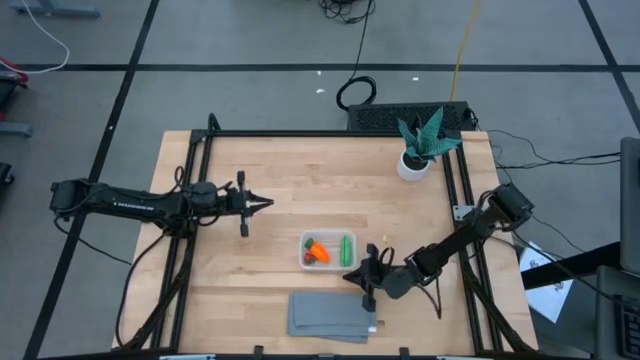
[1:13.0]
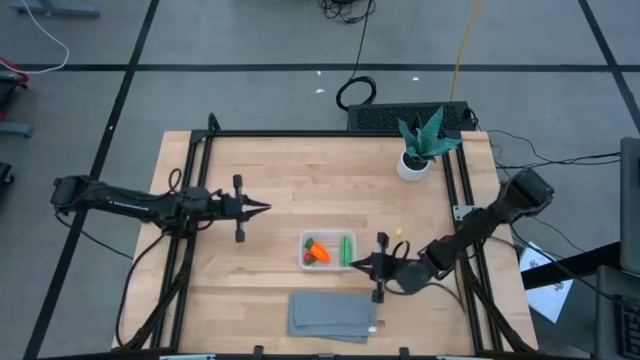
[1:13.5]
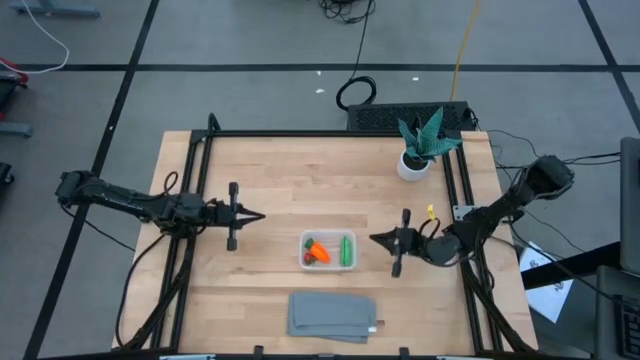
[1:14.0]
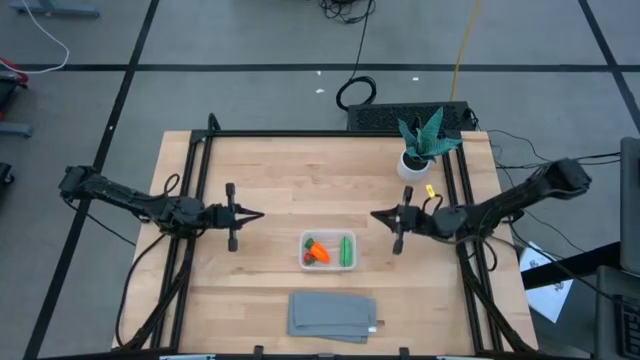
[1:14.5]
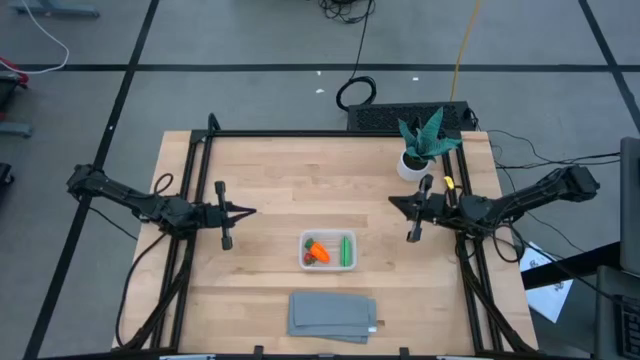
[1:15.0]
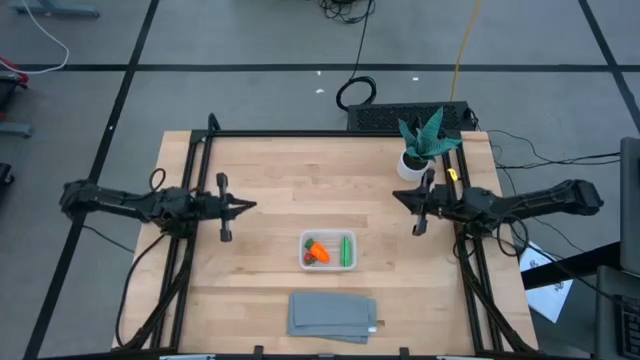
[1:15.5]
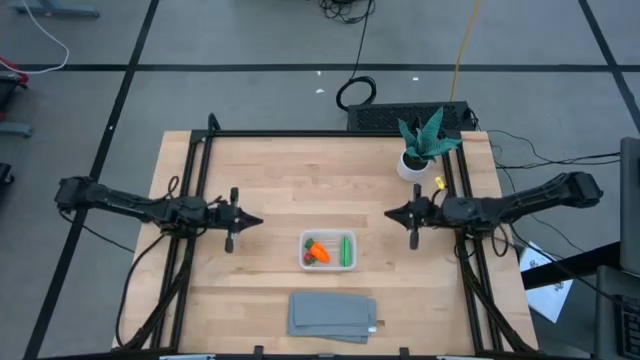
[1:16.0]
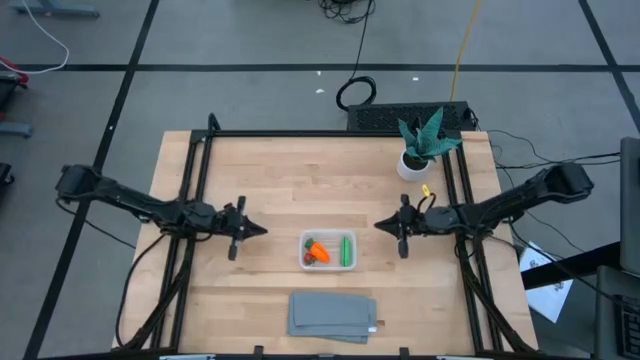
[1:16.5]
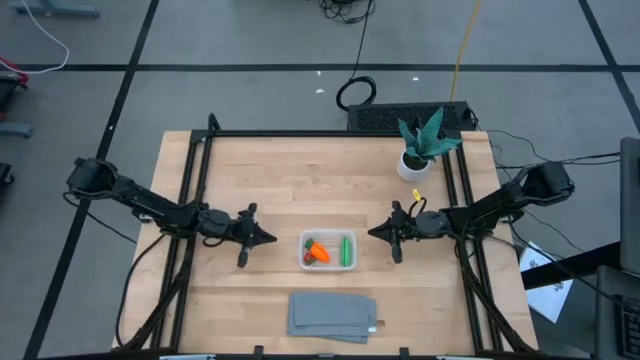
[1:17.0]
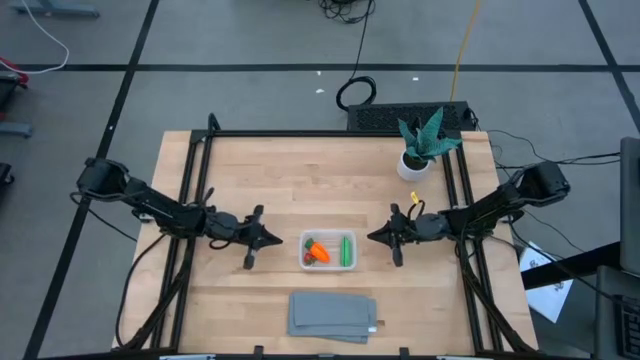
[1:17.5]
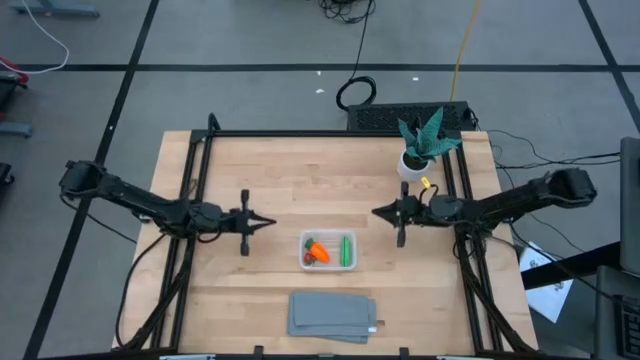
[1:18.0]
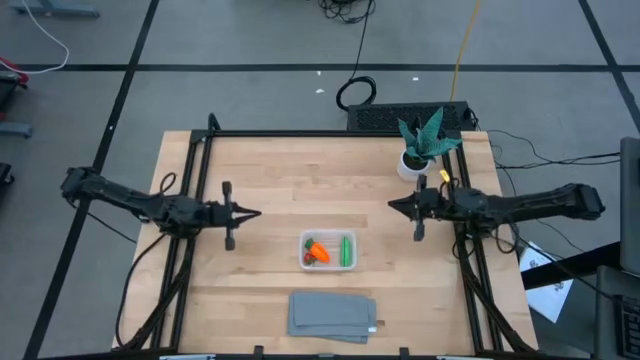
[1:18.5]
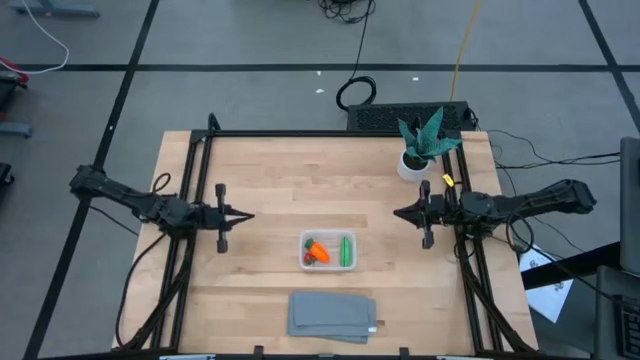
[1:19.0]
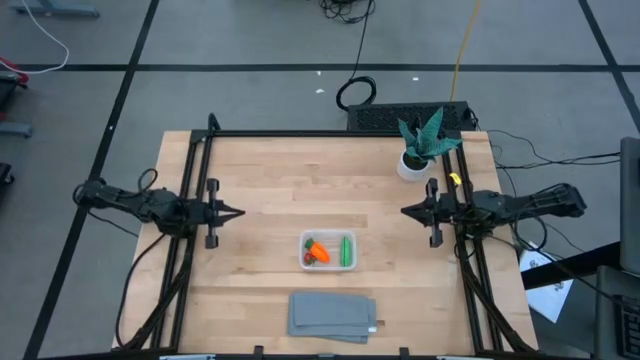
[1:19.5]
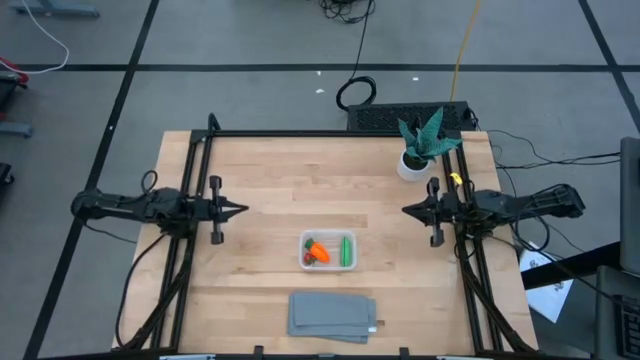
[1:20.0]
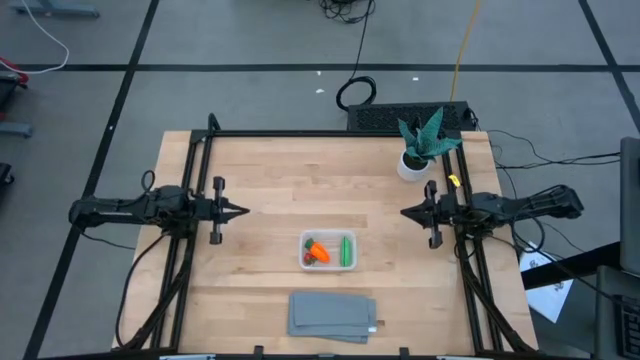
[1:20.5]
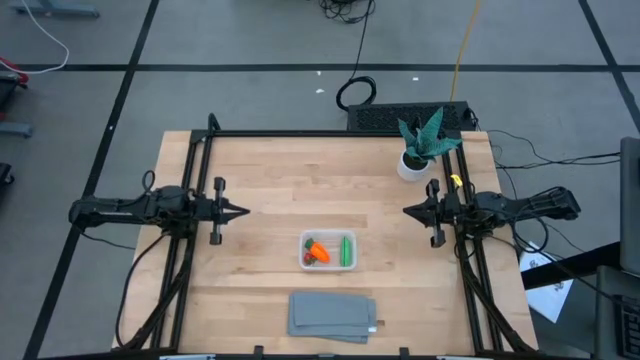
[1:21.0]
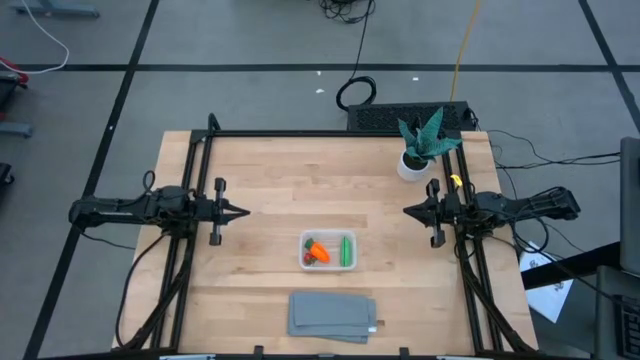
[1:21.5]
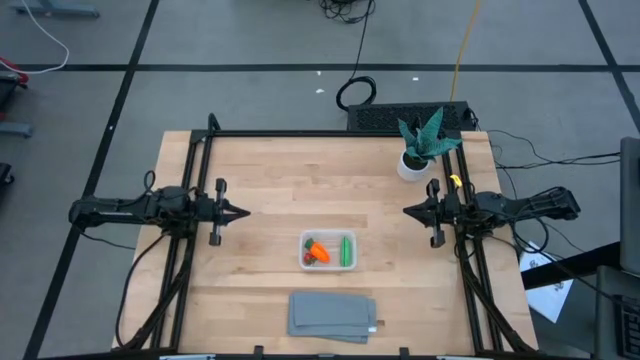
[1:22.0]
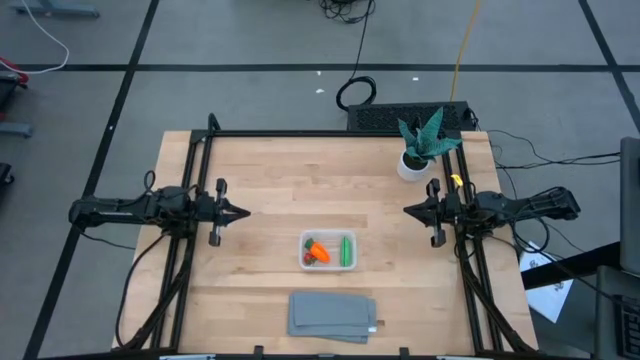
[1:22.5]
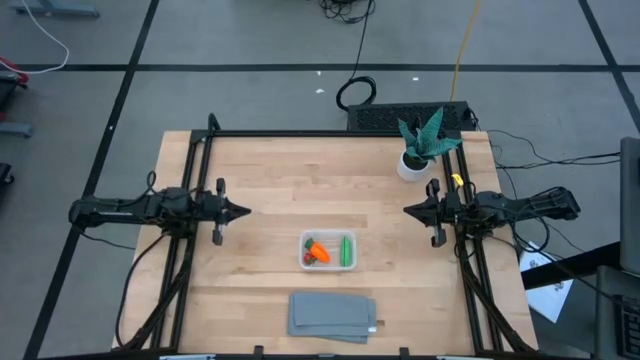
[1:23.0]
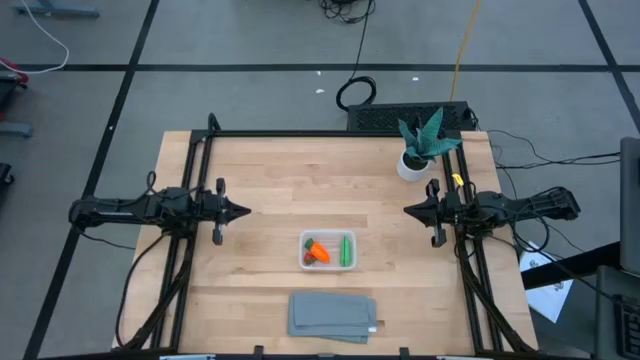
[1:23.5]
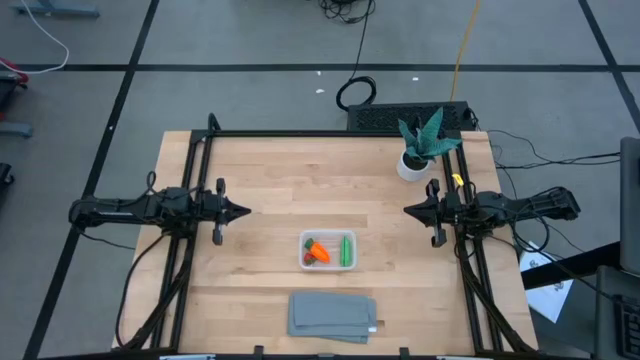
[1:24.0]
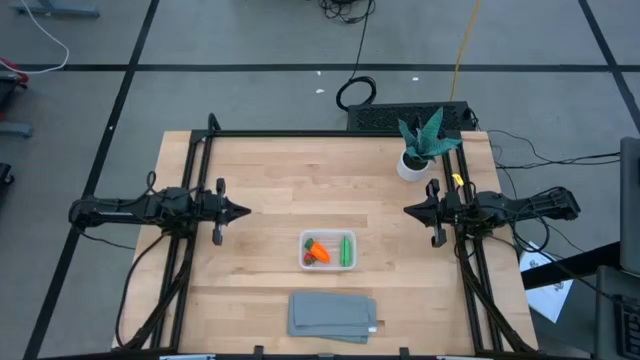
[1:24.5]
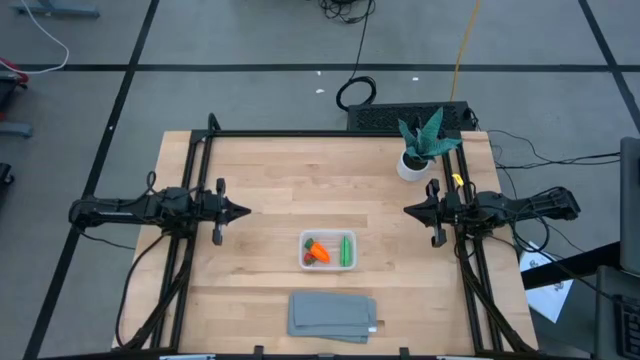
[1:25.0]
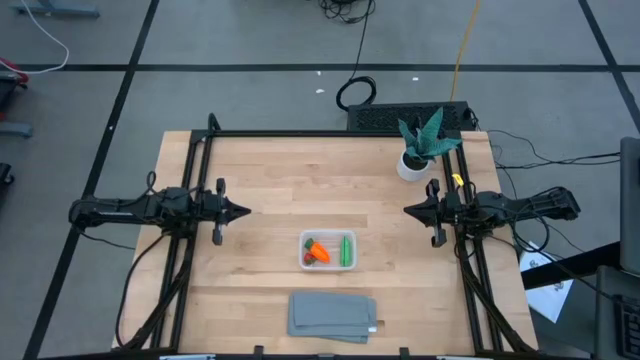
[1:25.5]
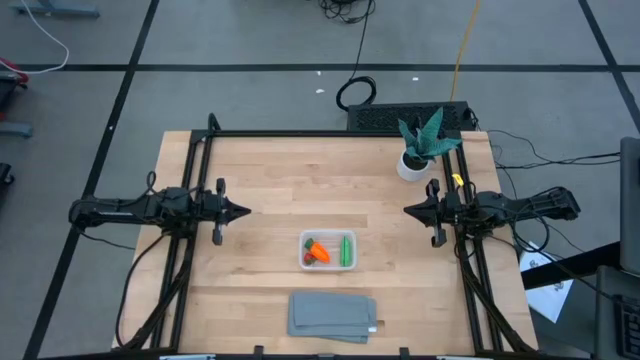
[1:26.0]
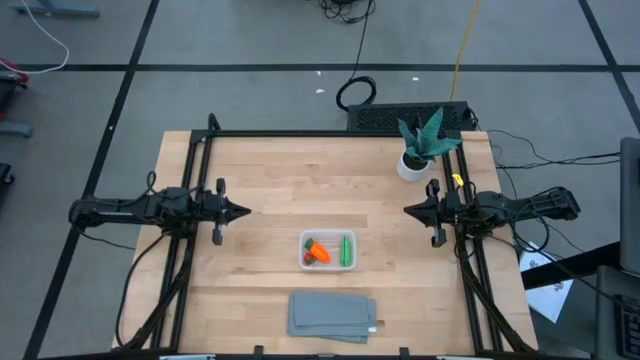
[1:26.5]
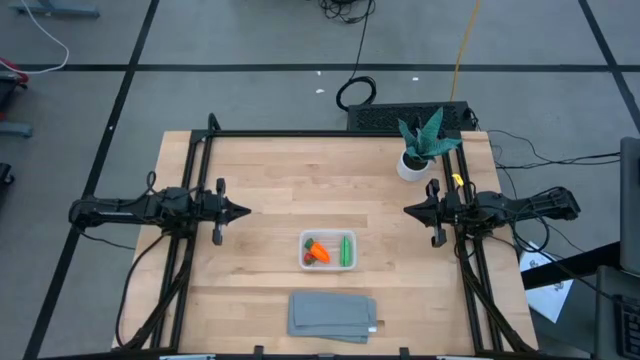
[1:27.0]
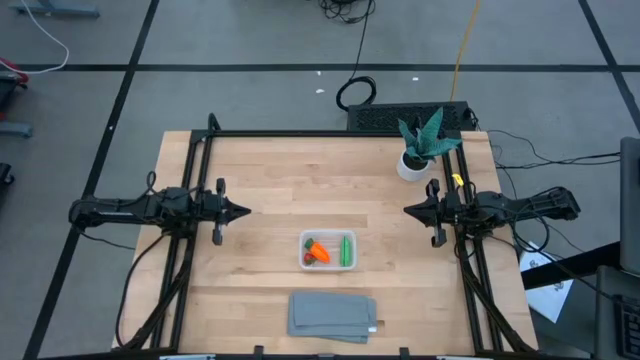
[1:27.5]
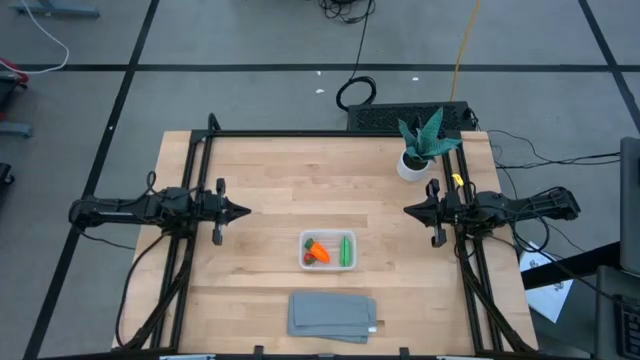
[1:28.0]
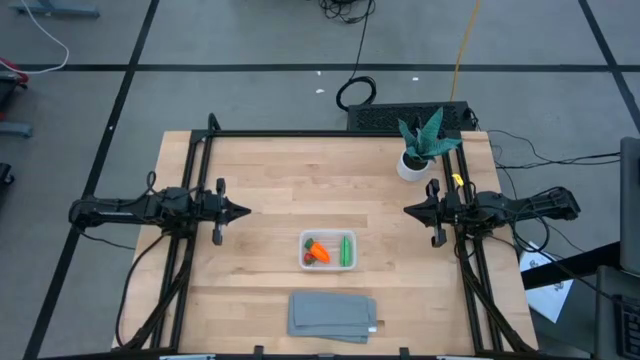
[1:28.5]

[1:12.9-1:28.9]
Task: Pick and placing Produce into tupperware
Return to Home Position

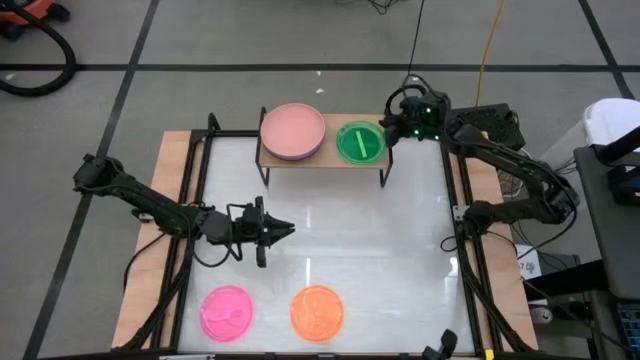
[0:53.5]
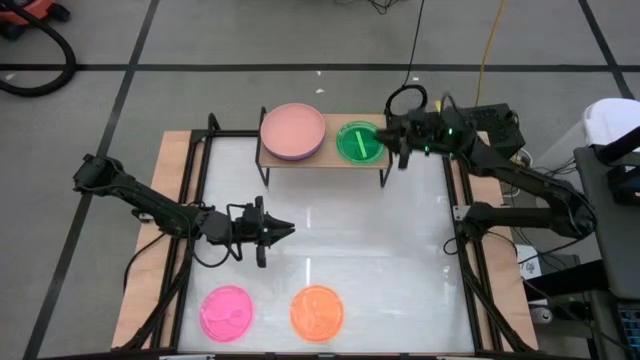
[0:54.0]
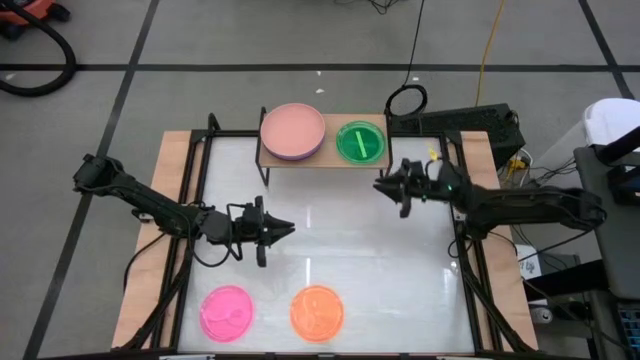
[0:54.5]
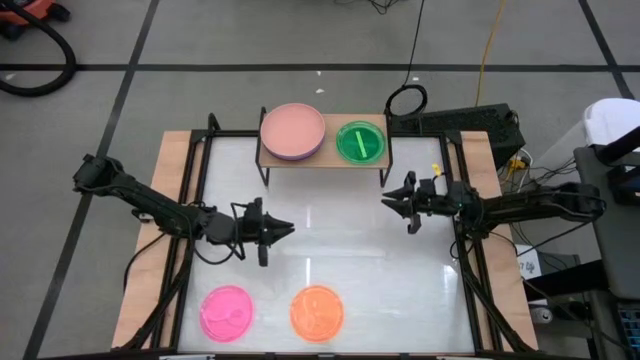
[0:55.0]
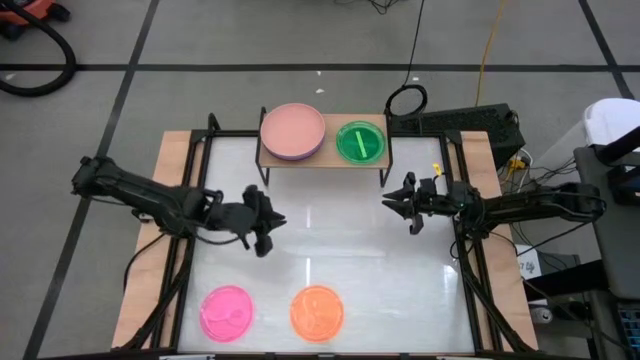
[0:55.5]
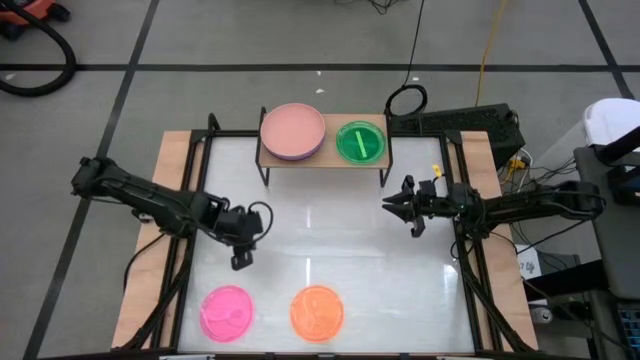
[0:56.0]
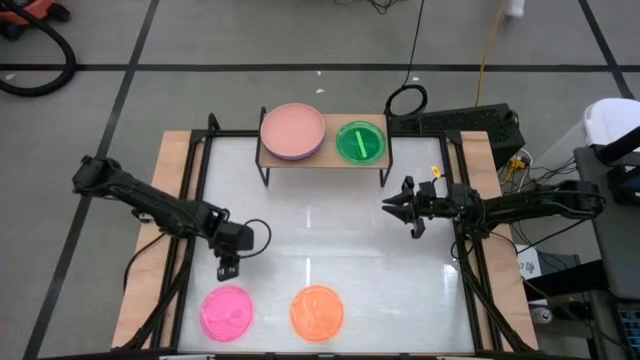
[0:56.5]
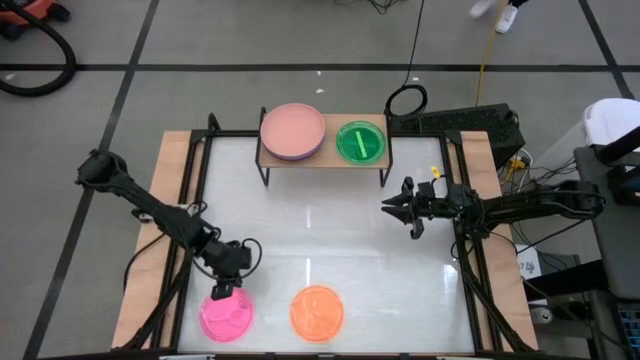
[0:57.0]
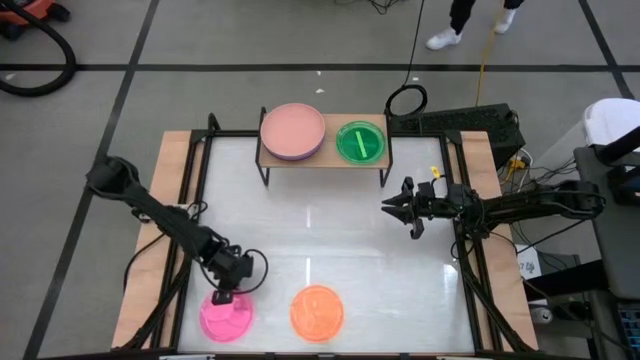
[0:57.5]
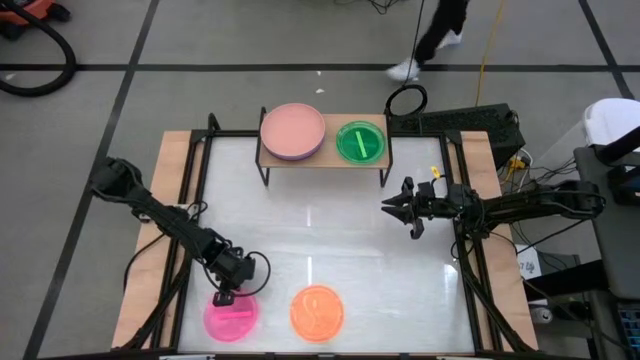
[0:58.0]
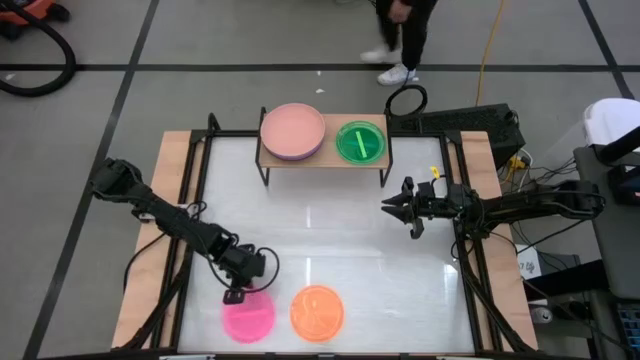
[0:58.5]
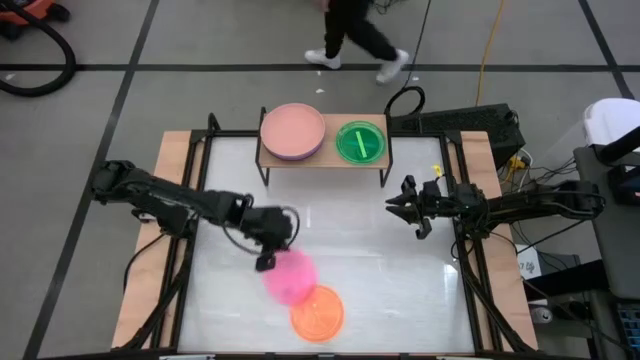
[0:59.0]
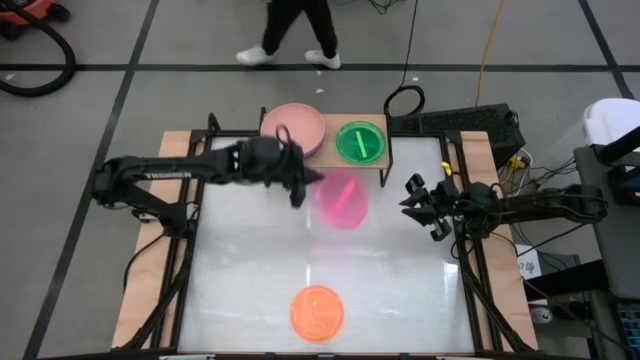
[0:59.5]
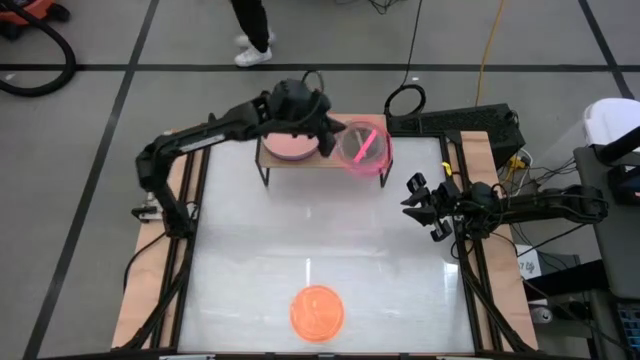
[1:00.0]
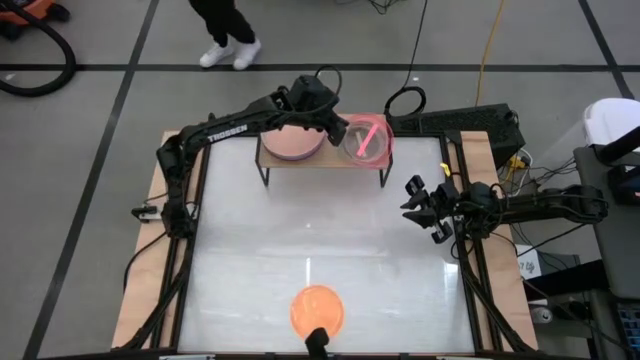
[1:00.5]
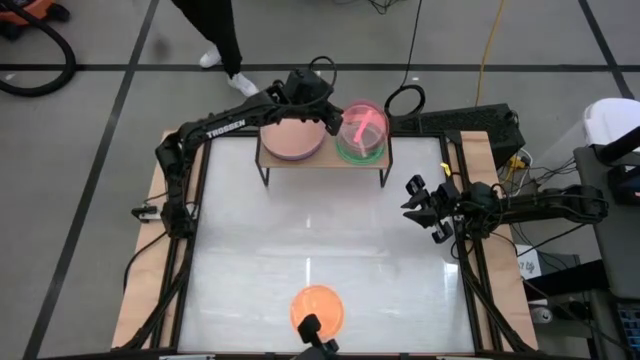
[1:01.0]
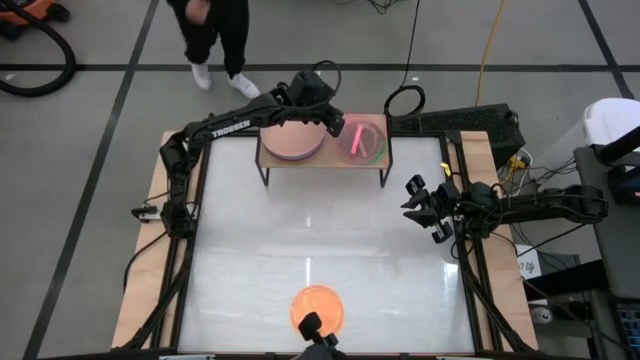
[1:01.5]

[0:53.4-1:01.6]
Task: Place and stack plates onto a shelf
Stack the transparent pink plate on top of the transparent green plate on the shelf
